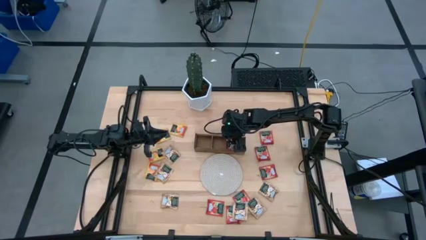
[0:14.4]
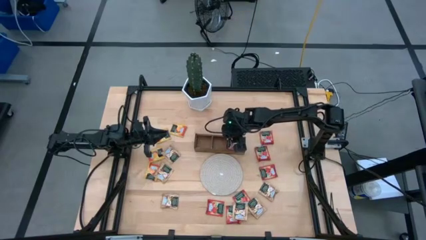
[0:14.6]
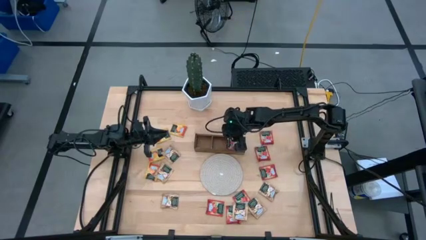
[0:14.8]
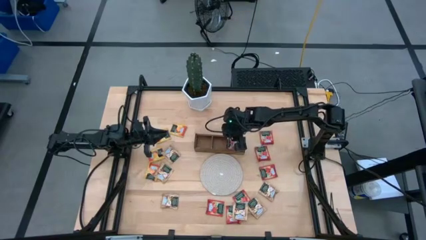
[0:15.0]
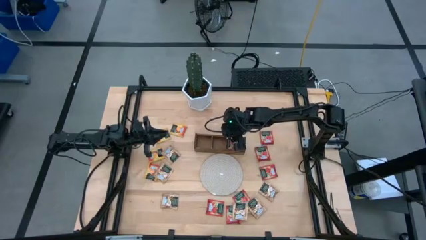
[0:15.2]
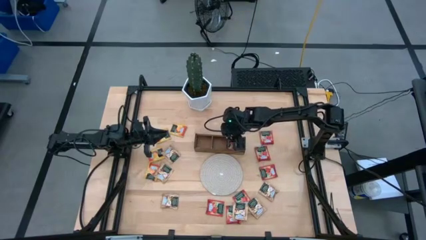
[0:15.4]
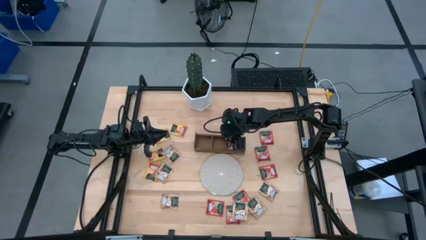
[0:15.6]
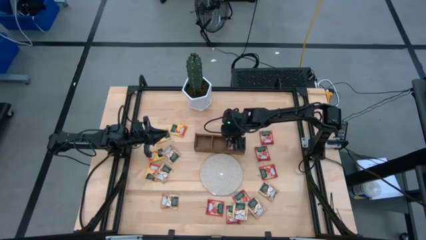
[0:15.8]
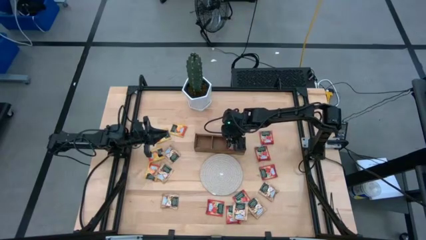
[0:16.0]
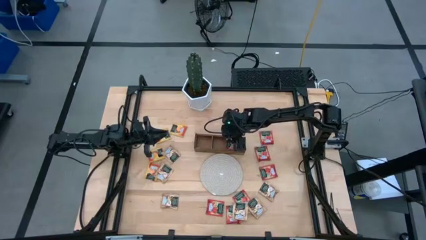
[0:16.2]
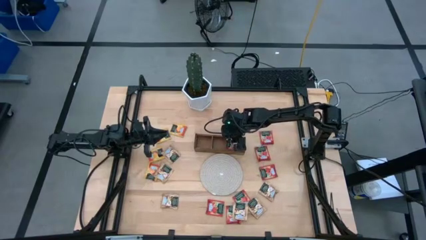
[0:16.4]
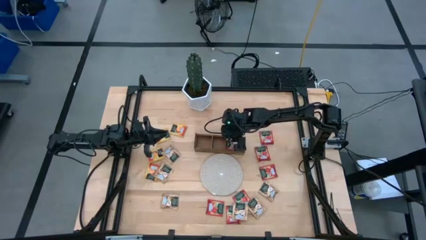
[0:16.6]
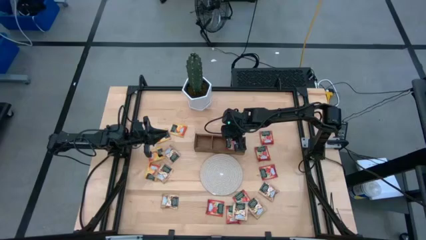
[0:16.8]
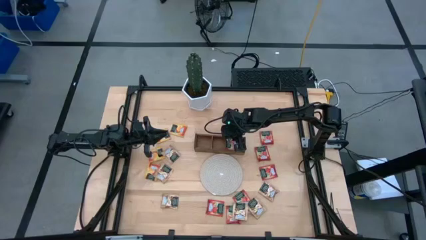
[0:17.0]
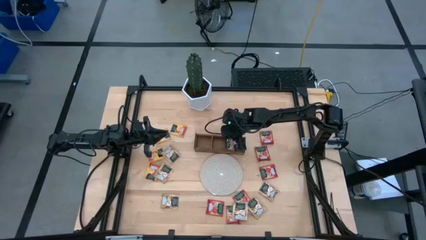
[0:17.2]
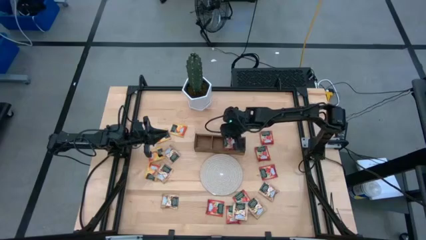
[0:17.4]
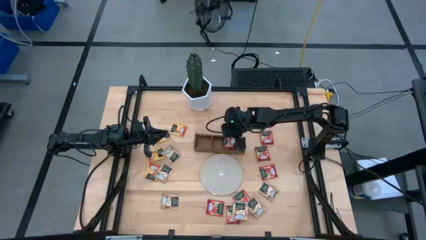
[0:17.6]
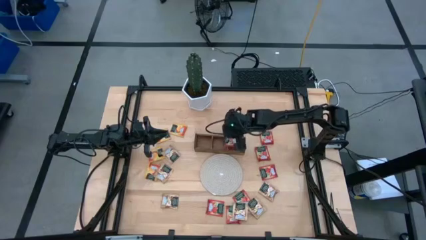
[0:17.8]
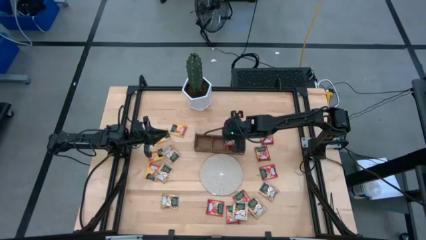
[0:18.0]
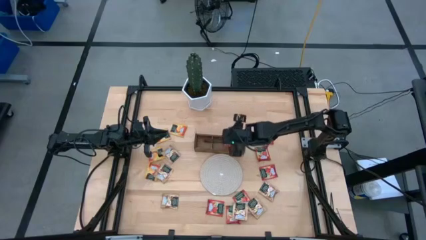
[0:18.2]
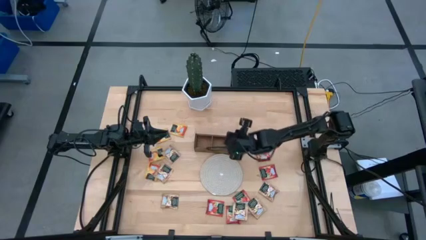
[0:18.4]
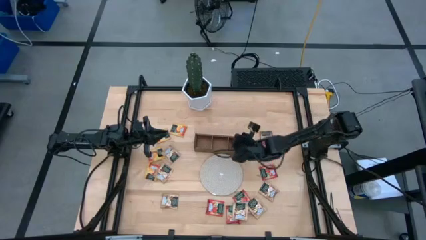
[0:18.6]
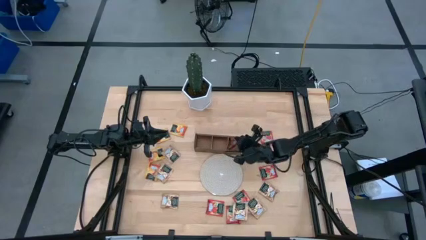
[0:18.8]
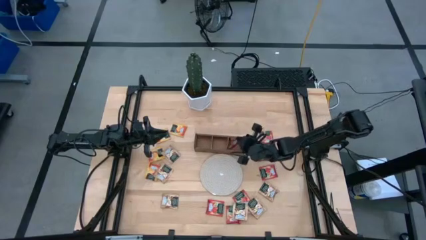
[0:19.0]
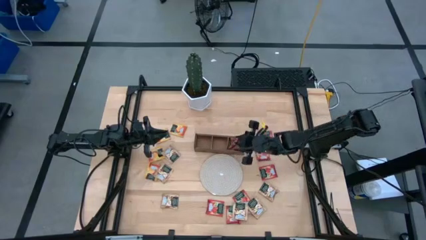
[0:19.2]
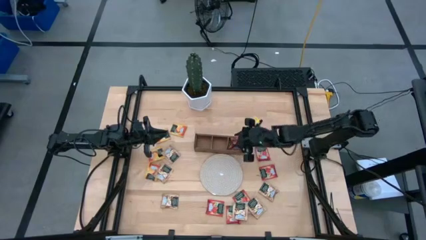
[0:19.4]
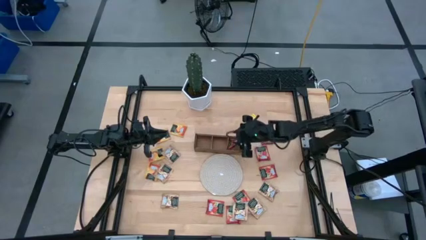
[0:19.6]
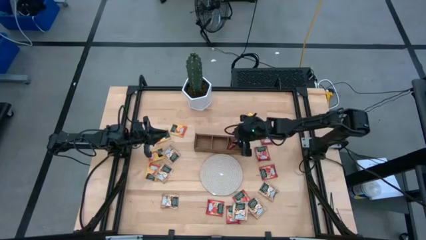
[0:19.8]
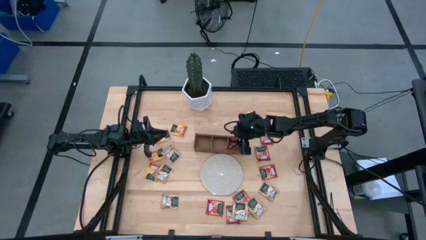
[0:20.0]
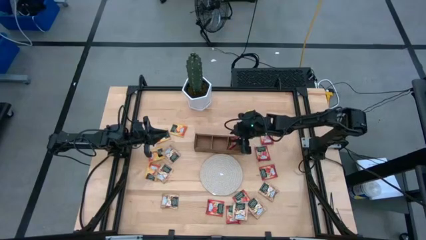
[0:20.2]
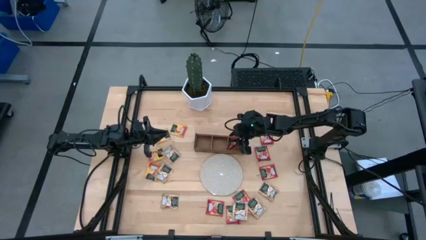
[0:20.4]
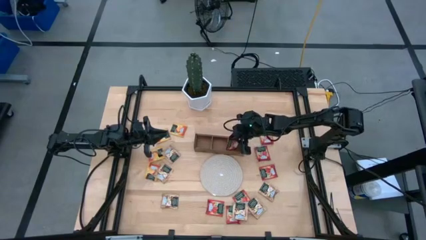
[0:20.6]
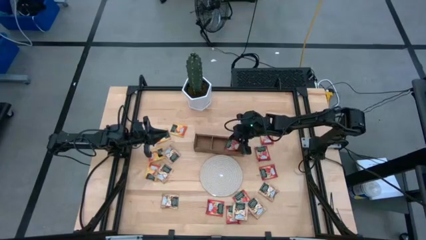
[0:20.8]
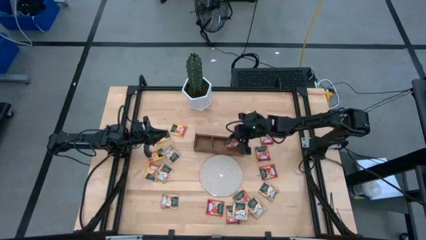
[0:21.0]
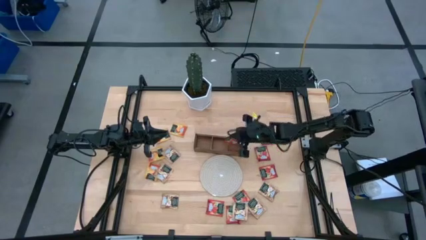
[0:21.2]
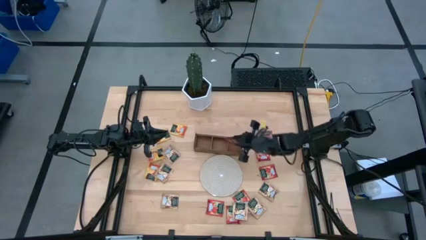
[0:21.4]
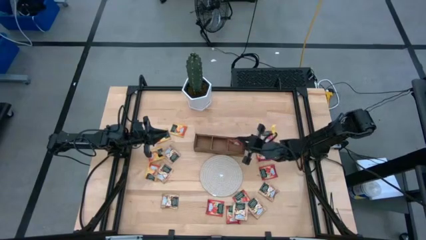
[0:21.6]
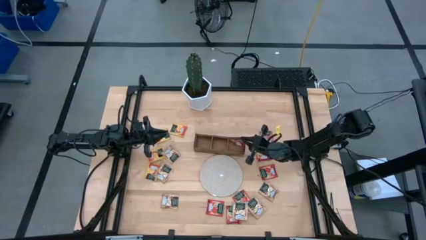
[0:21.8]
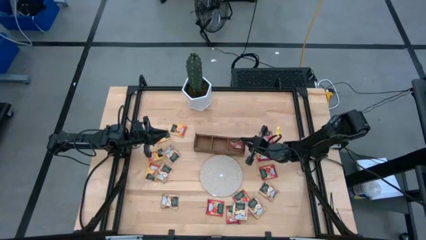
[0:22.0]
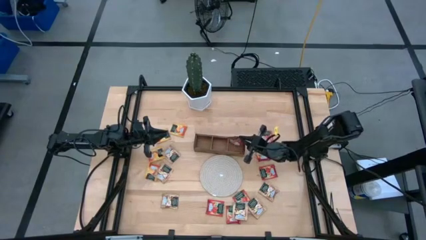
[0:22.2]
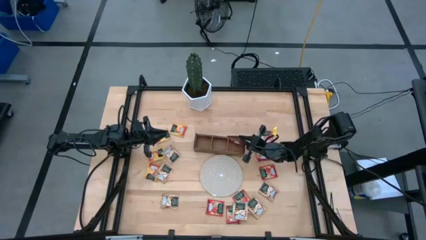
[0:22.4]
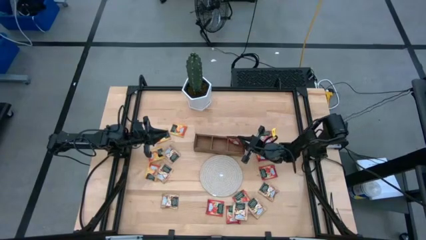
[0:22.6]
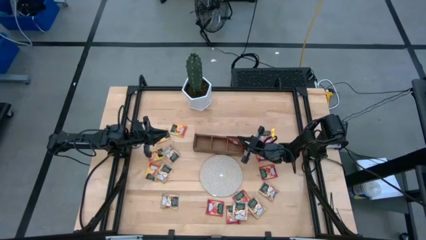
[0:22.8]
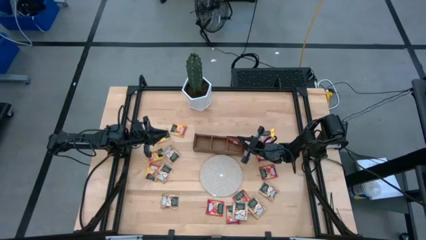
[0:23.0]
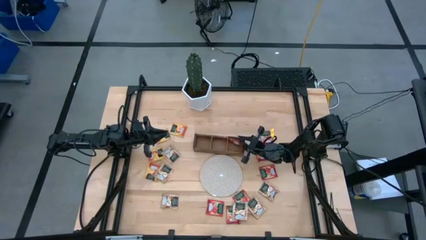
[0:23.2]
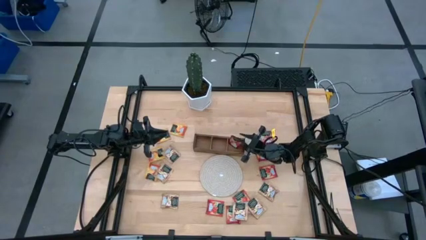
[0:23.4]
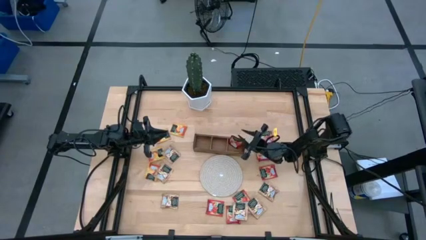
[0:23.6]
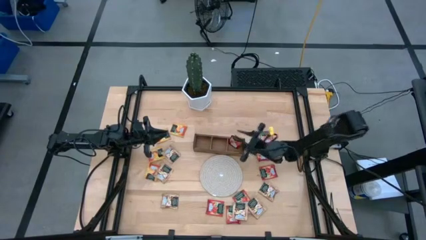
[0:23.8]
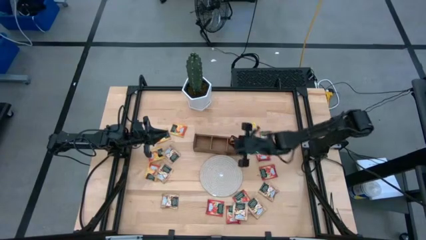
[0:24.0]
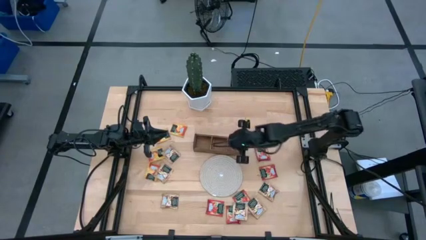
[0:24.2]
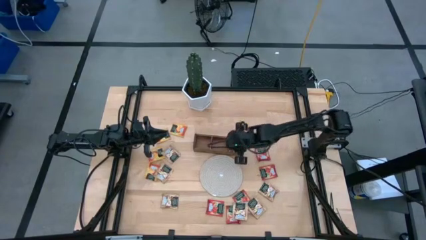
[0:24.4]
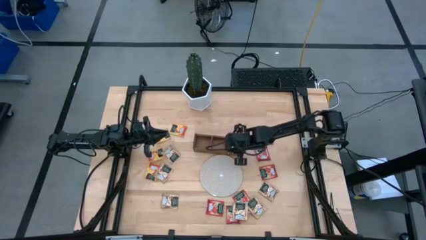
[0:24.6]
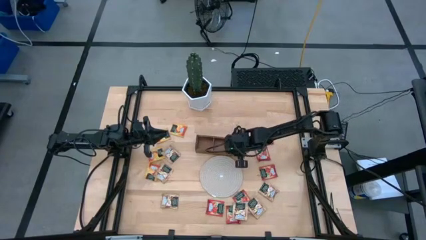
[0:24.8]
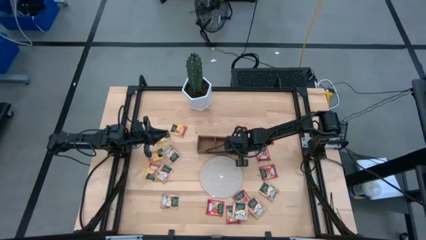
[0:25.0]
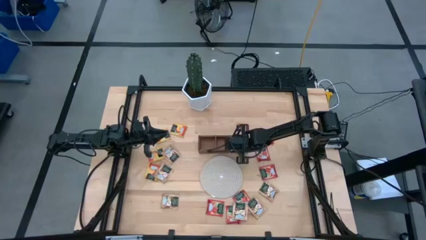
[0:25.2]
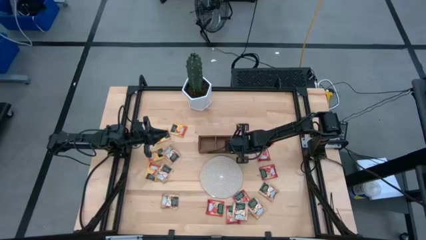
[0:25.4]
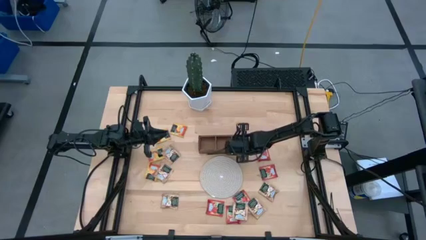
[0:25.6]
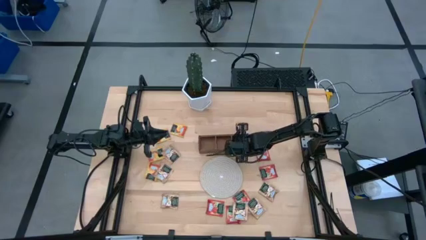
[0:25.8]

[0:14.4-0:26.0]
Task: Pick & Place Tea
Put the red tea bag into the right section of the wooden organizer

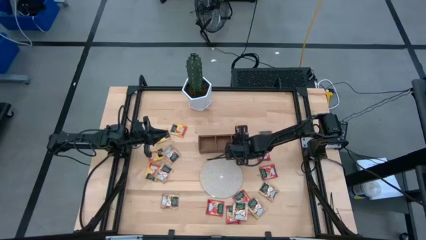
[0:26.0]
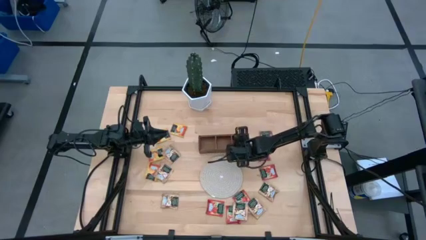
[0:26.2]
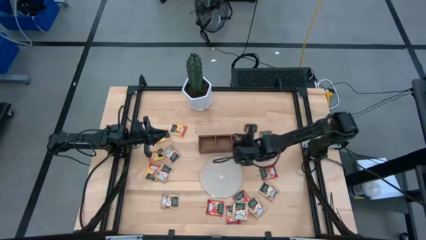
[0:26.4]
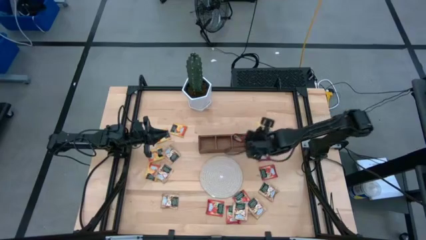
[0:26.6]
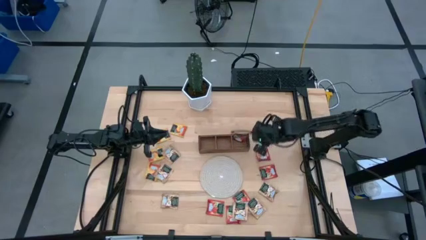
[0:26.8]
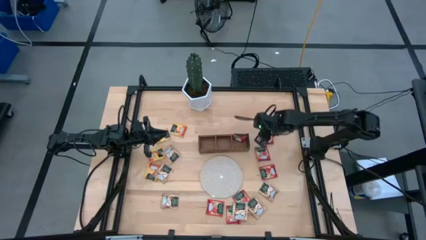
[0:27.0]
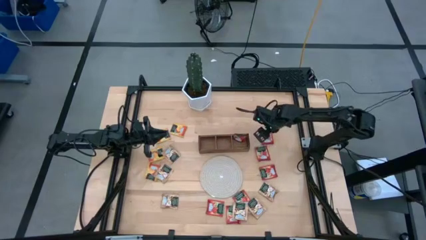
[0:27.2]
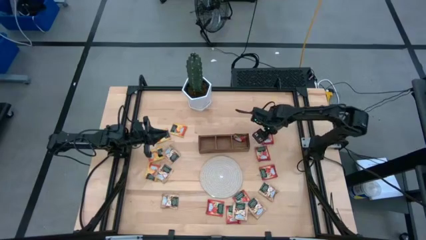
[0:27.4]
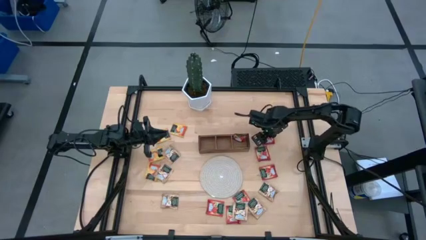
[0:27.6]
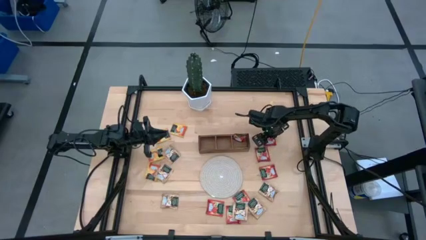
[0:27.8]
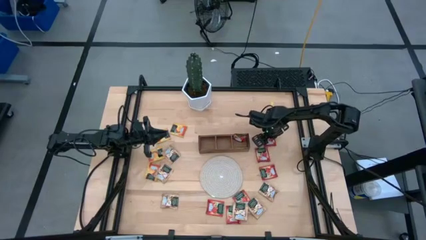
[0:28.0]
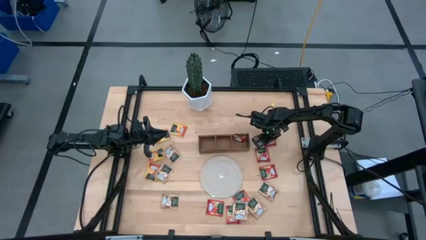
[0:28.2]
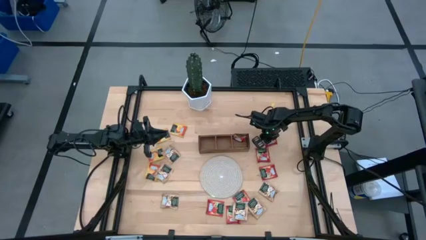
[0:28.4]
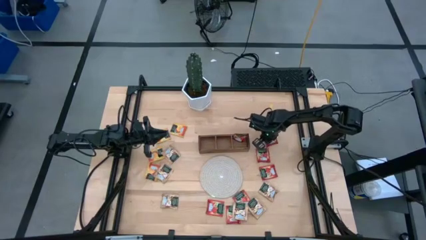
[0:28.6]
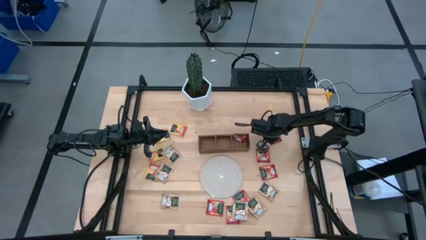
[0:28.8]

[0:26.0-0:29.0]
Put the red tea bag into the right section of the wooden organizer

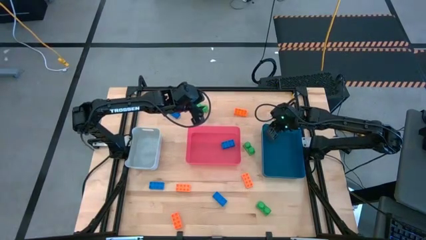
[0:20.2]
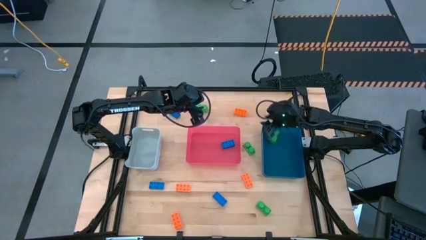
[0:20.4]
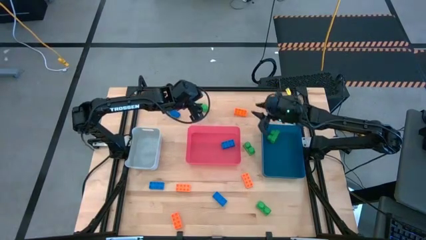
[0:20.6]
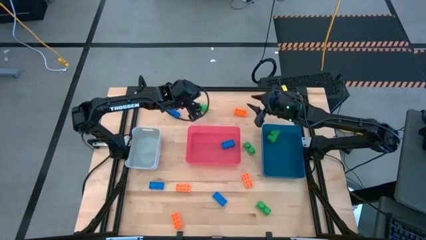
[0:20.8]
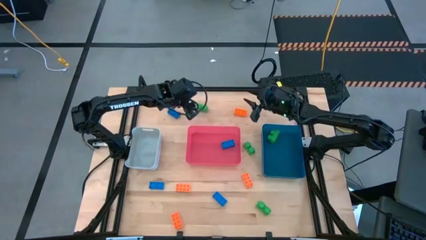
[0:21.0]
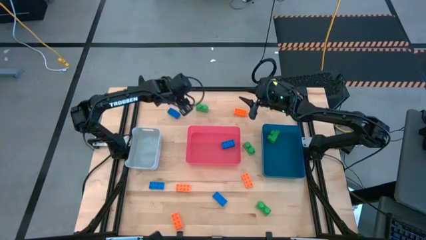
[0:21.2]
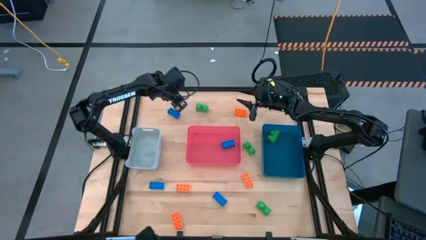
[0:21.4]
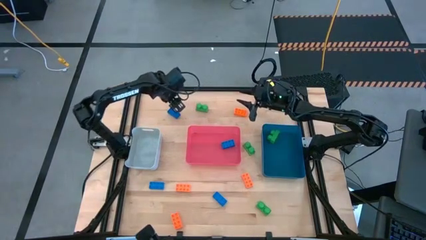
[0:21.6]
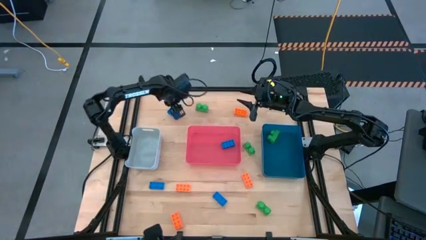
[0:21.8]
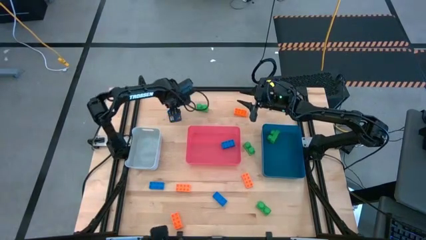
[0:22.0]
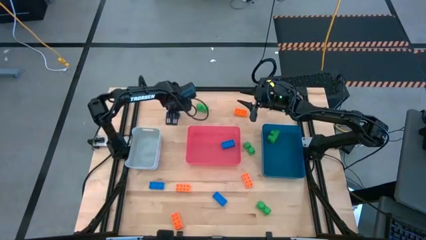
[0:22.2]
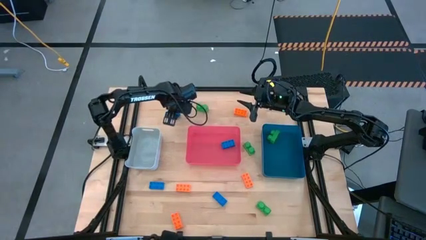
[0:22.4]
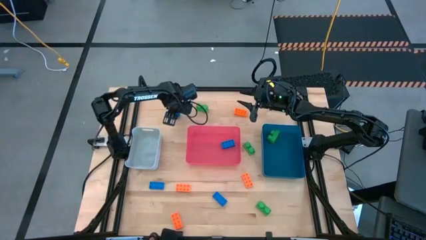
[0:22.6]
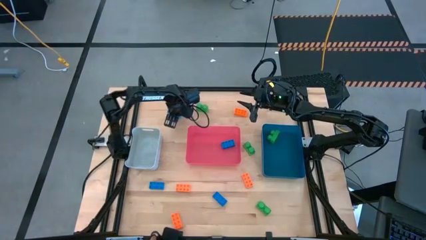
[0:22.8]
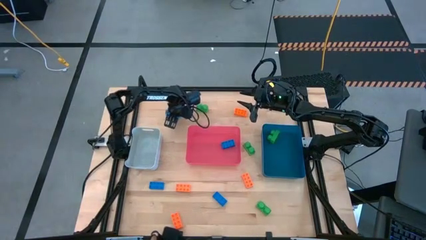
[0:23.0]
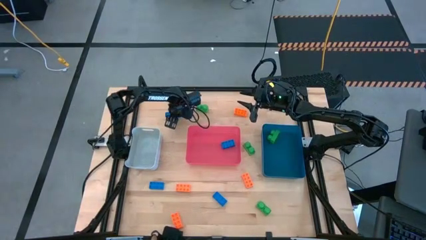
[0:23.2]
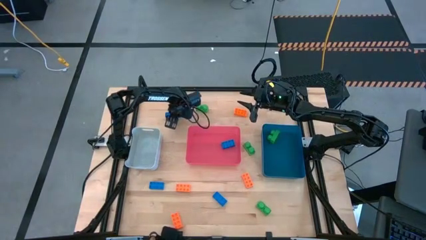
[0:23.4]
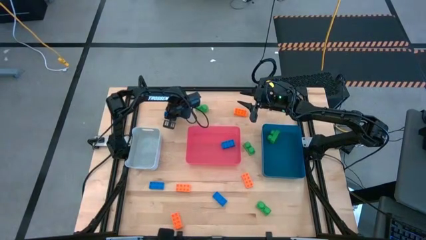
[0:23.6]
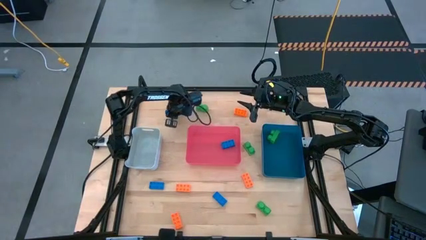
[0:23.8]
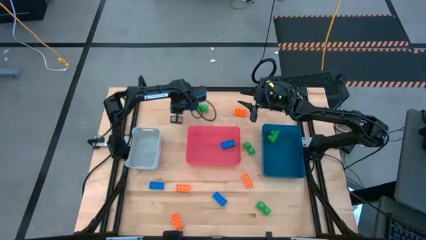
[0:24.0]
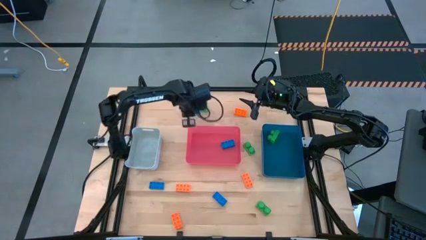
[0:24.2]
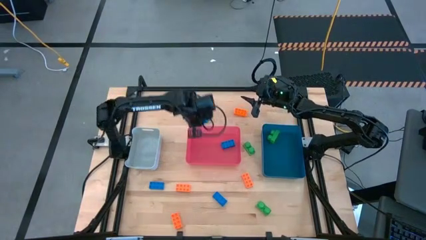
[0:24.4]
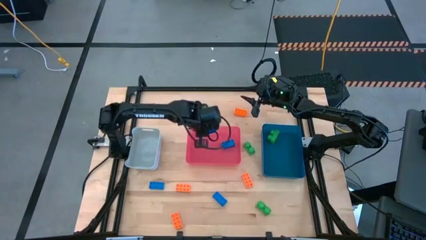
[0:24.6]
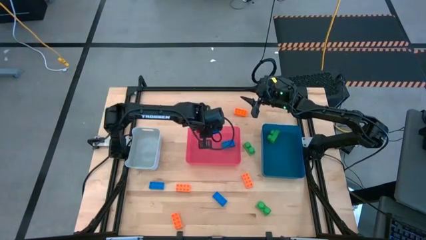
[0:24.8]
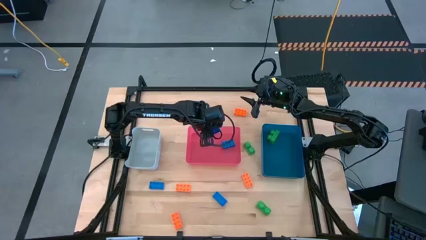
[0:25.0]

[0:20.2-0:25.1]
Task: Sort & place blocks by color
Put the blue game piece into the red bin
